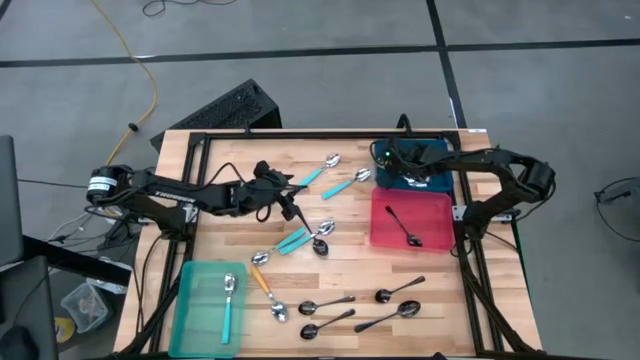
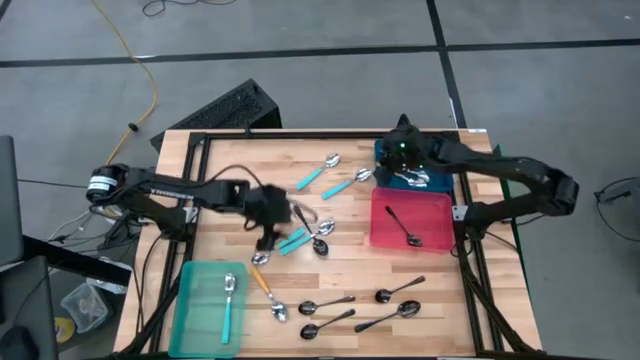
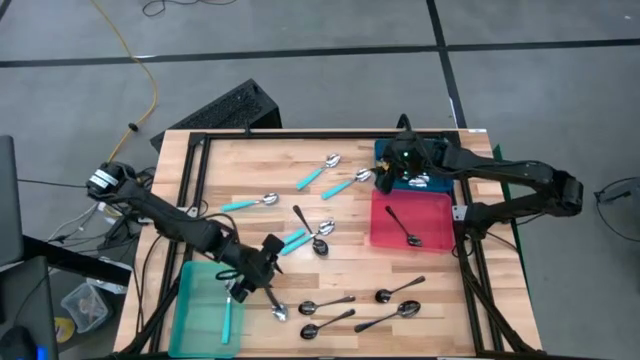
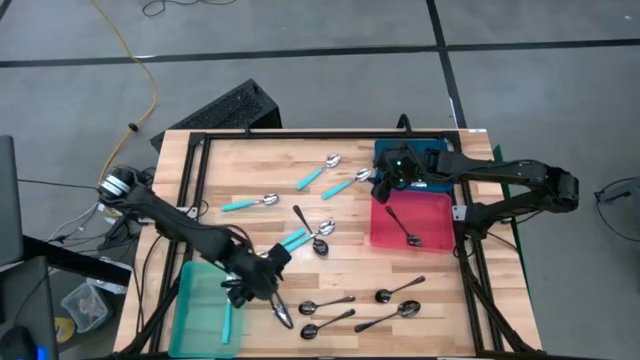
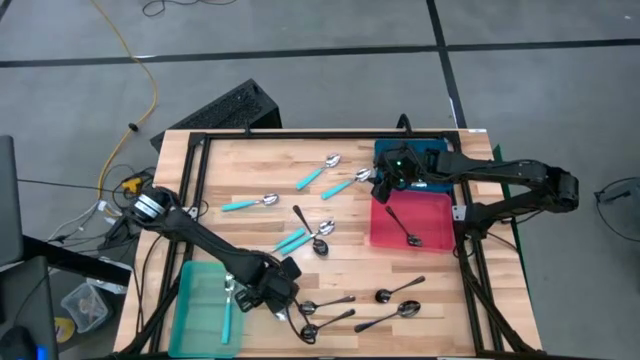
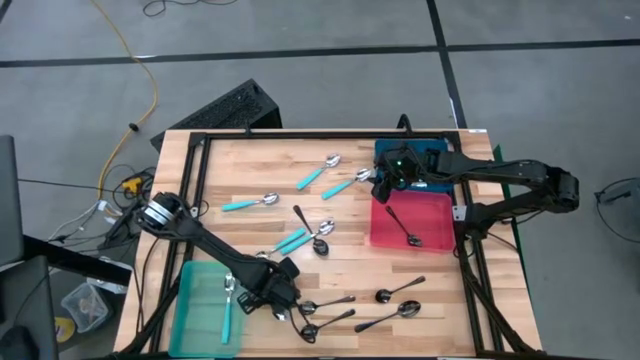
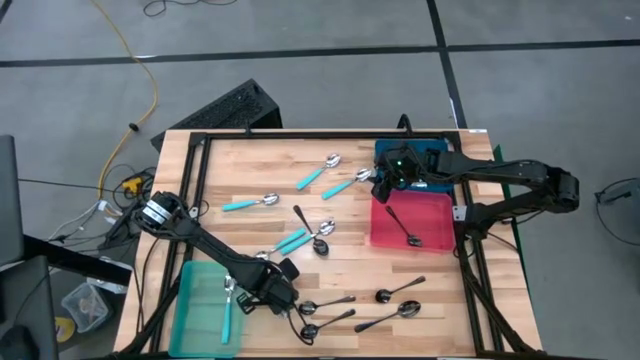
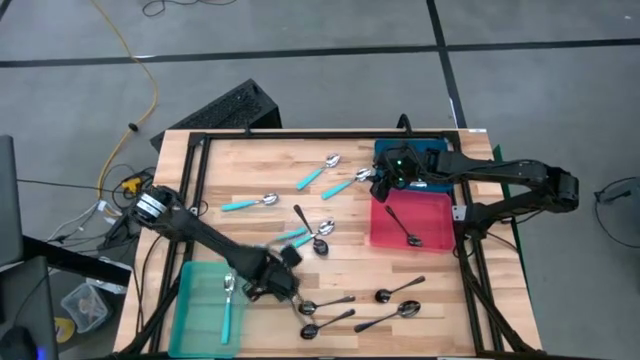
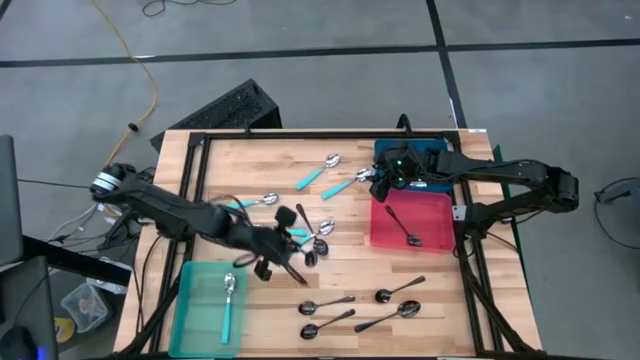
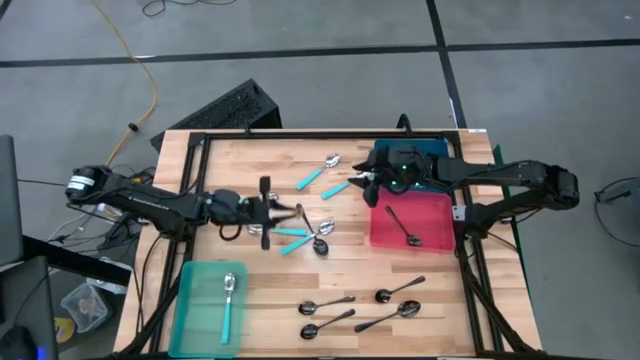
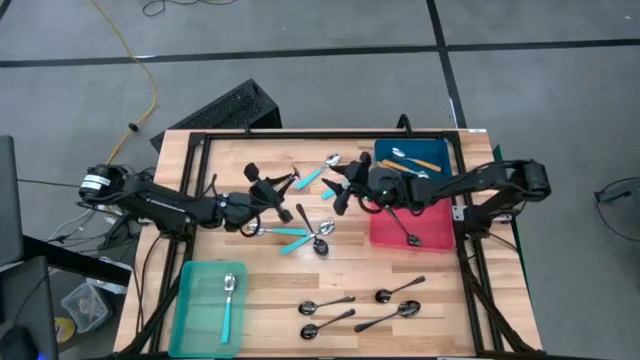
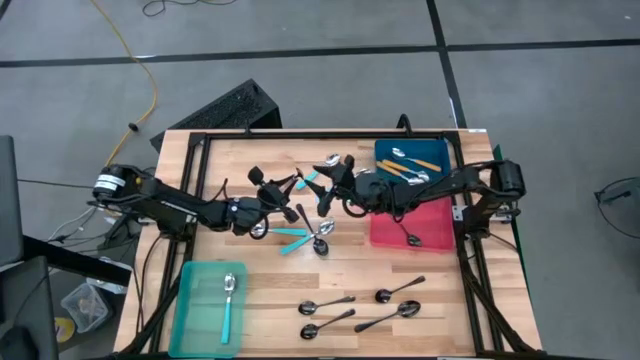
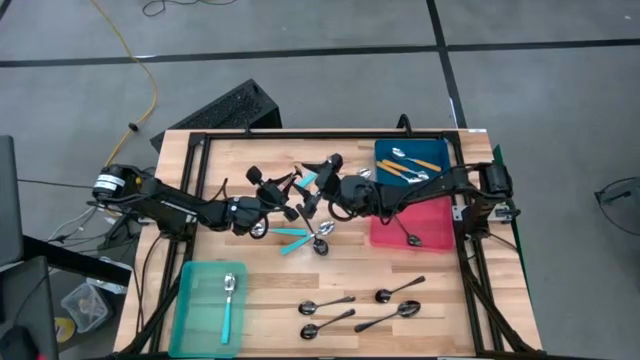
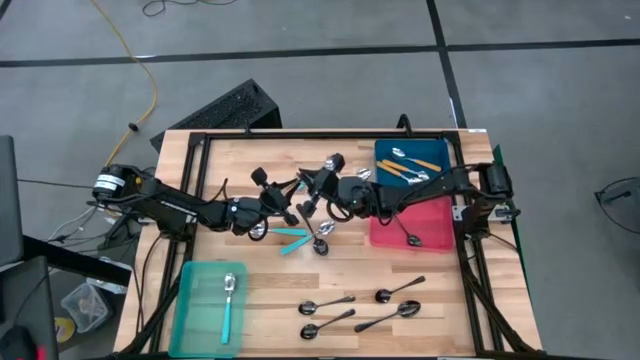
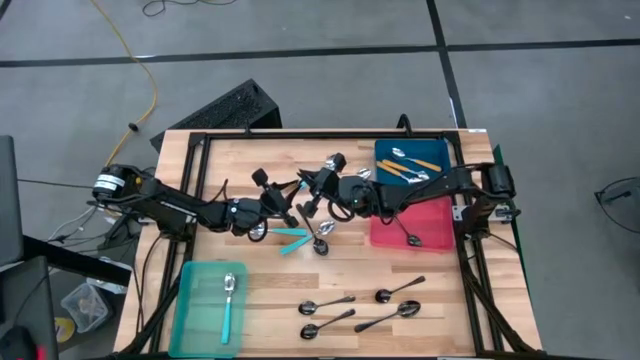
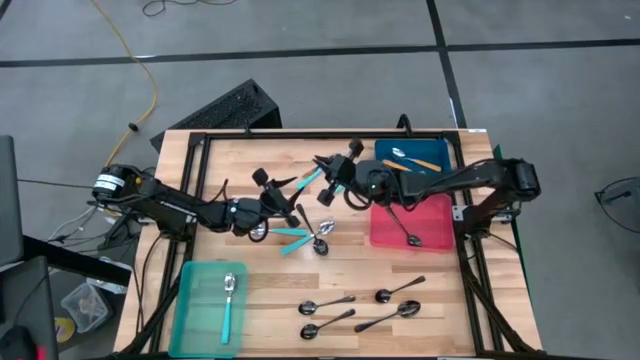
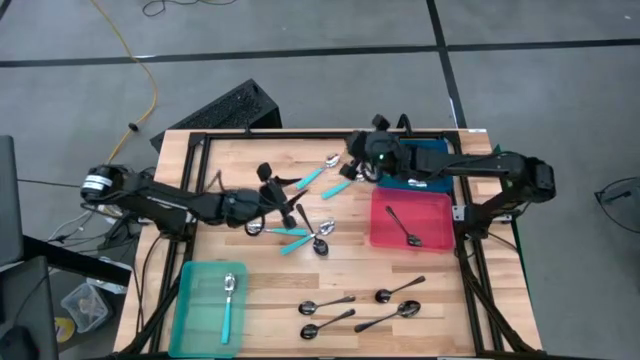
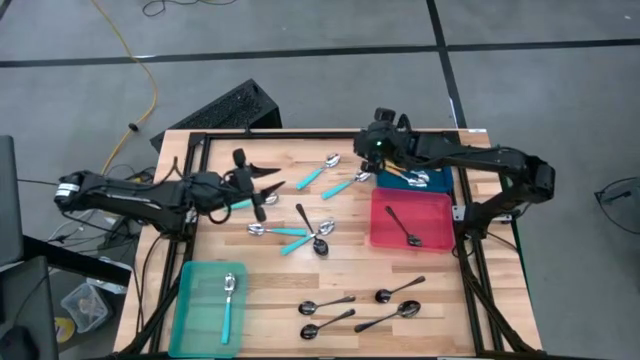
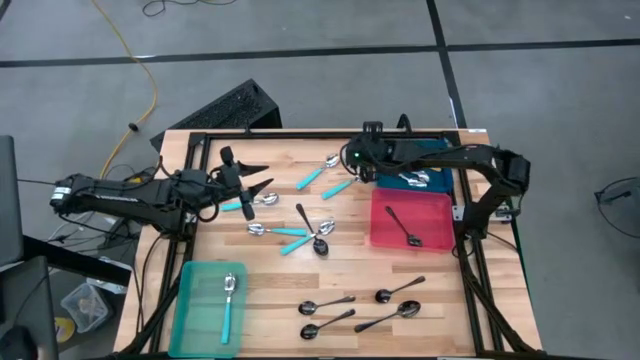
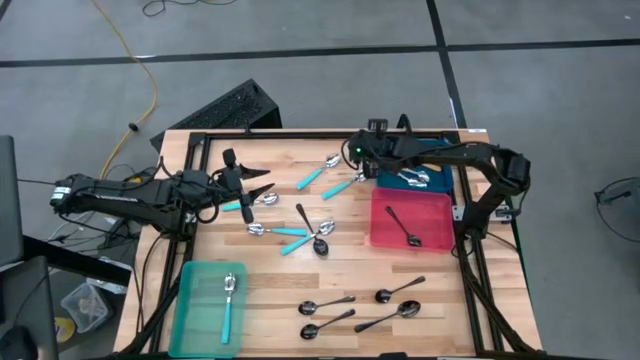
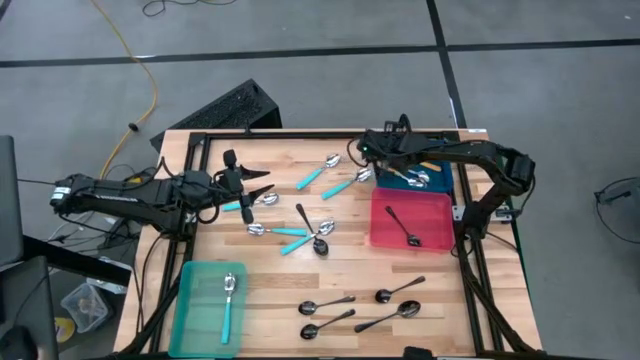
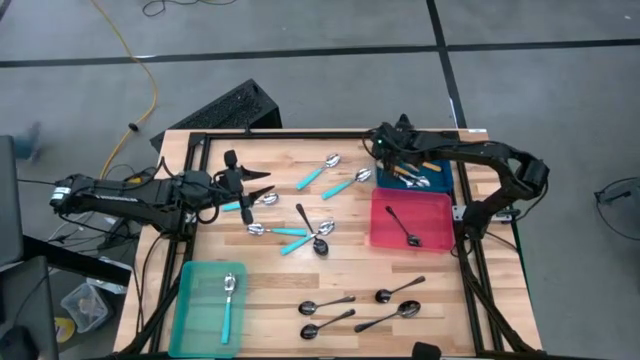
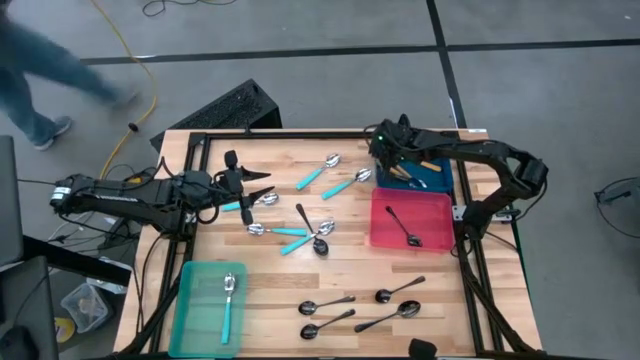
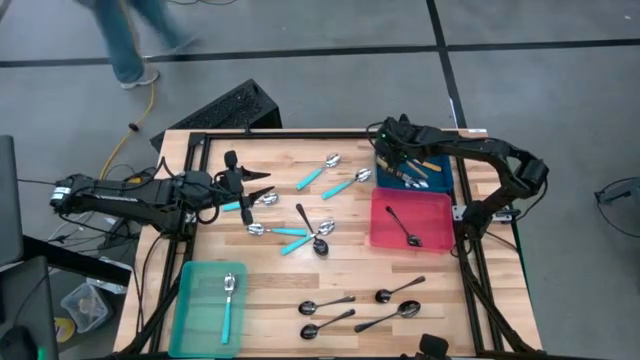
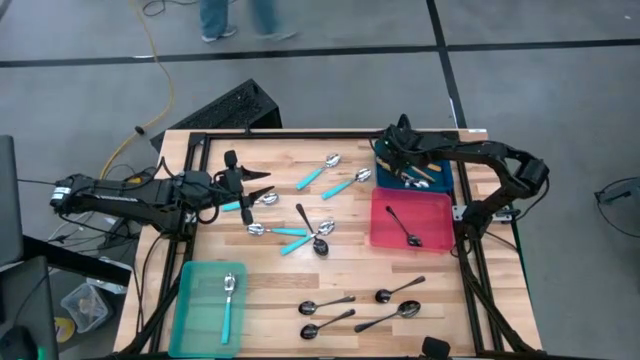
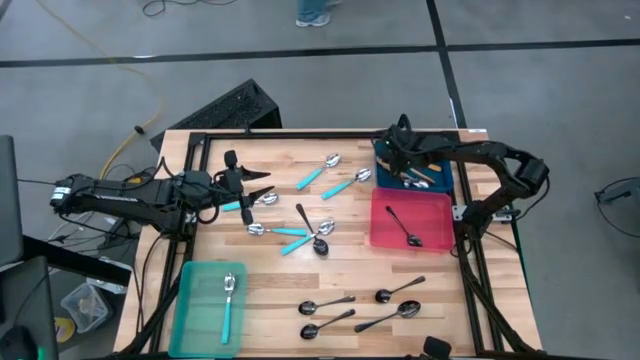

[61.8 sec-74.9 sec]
Task: Sort silverware by color (type)
Put the yellow spoon into the blue bin

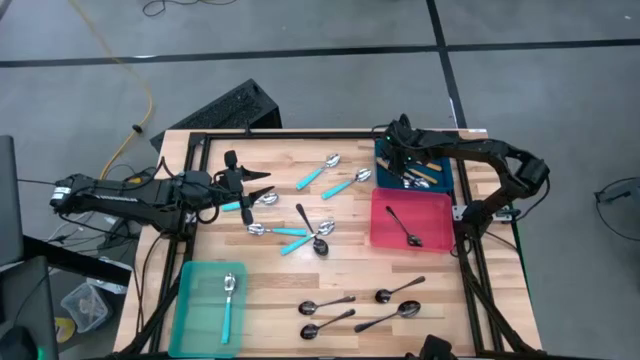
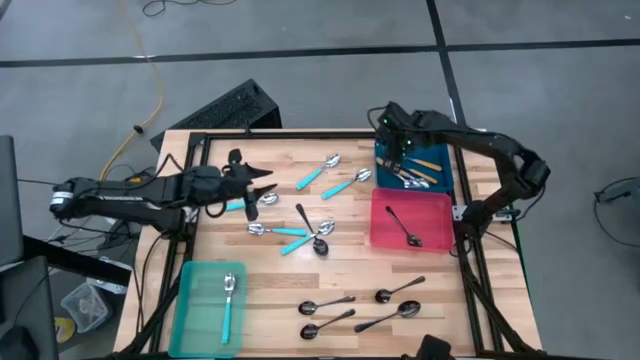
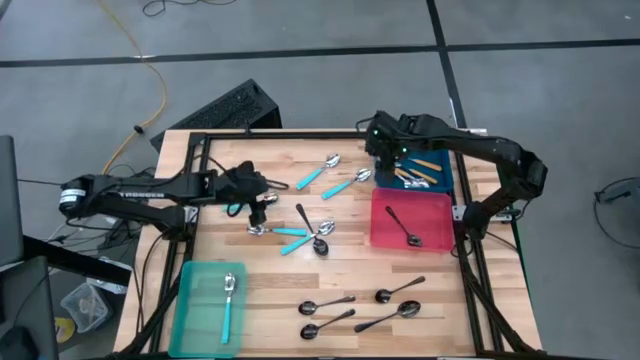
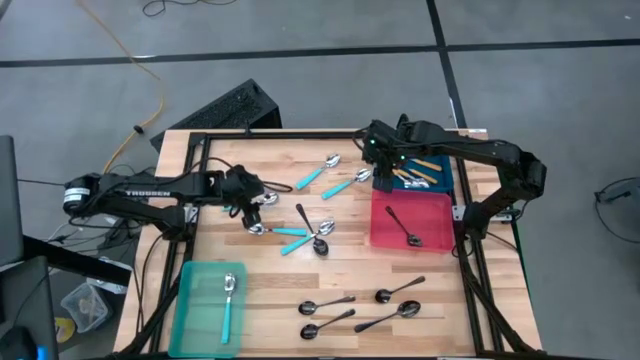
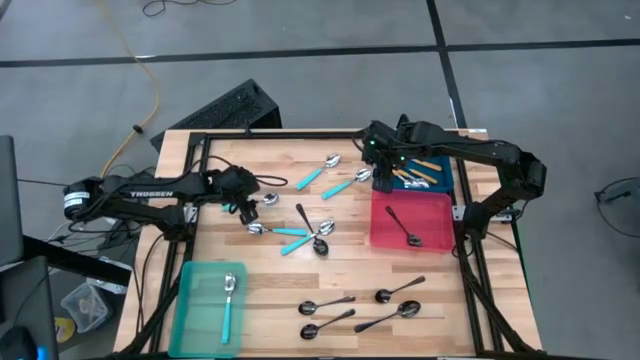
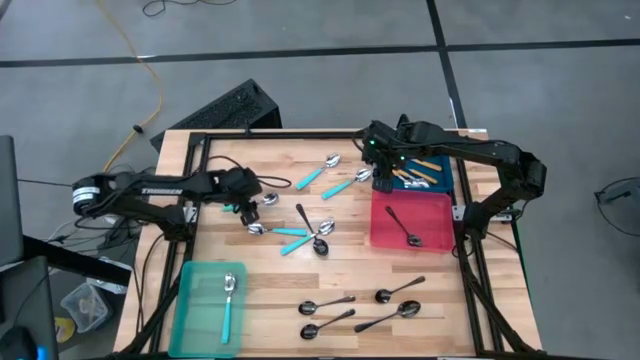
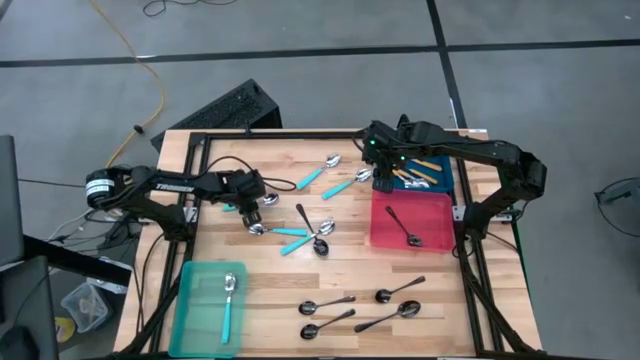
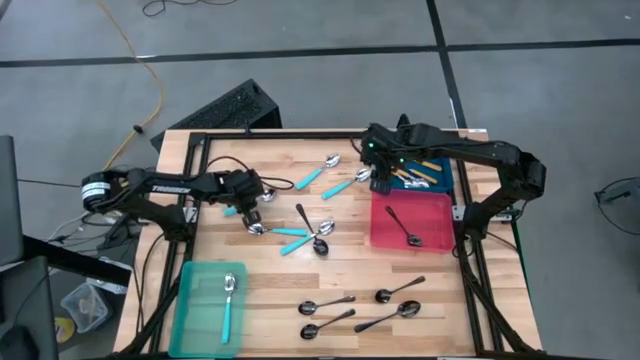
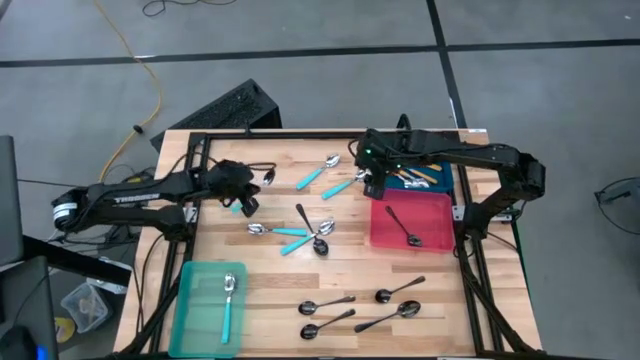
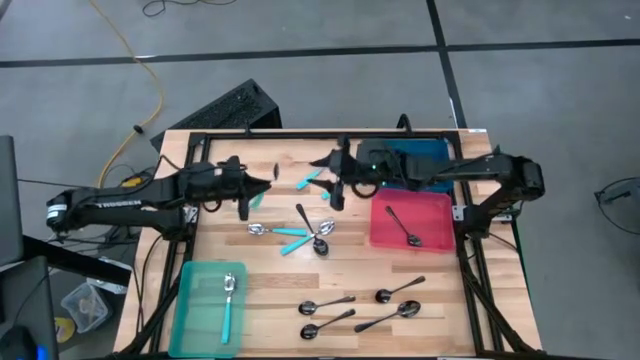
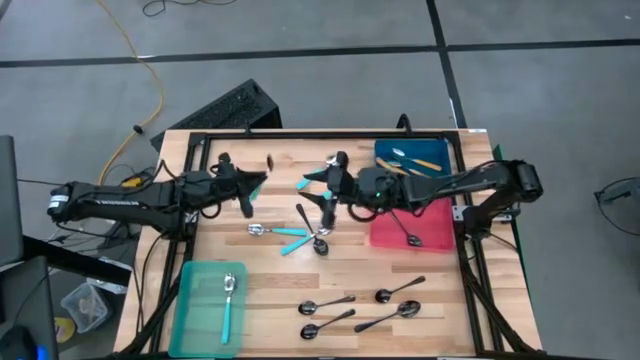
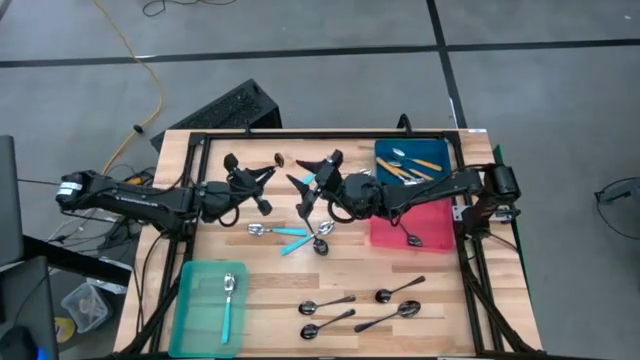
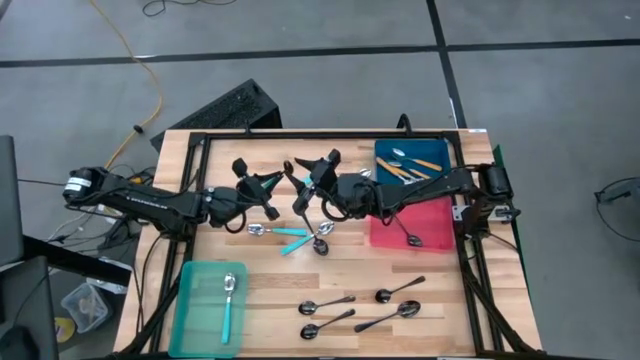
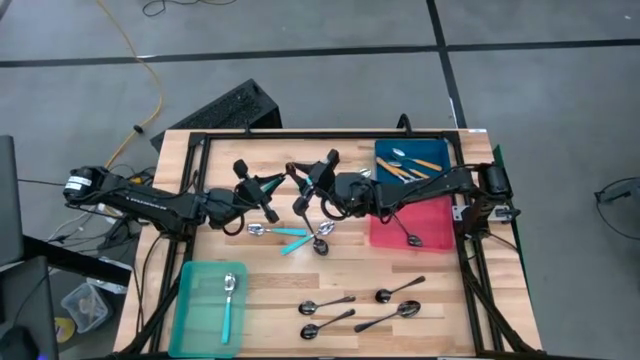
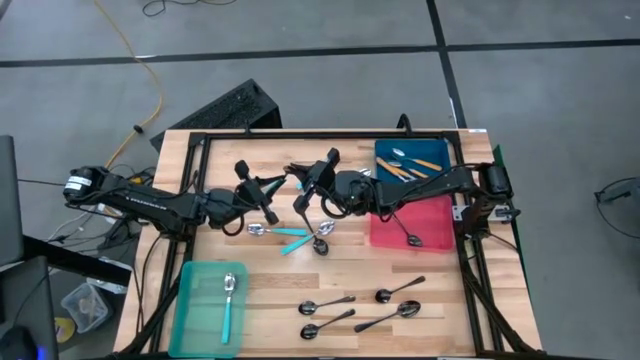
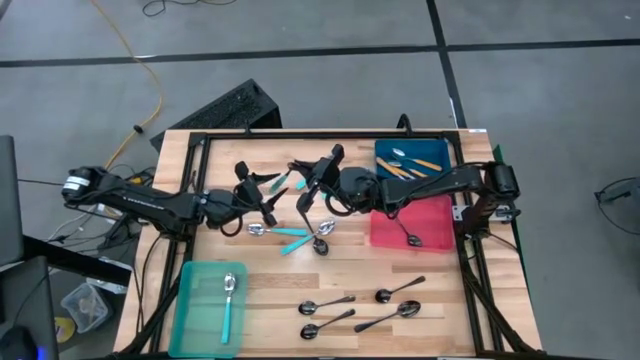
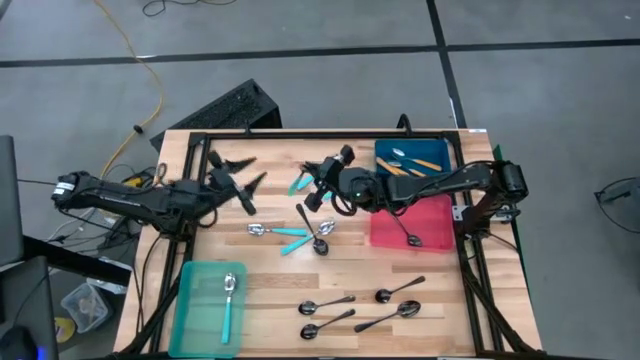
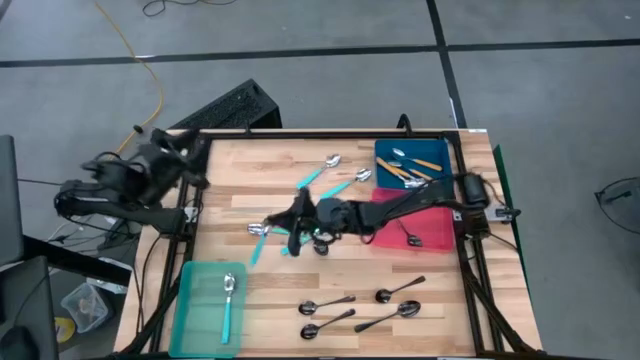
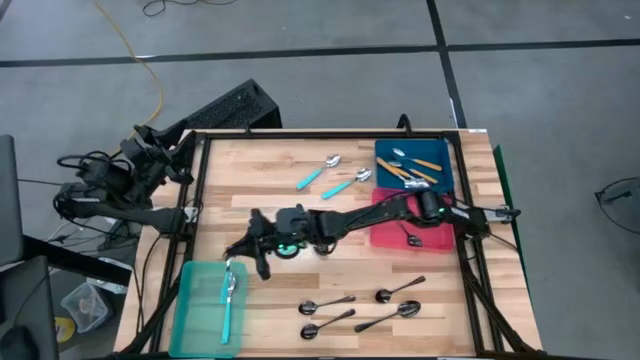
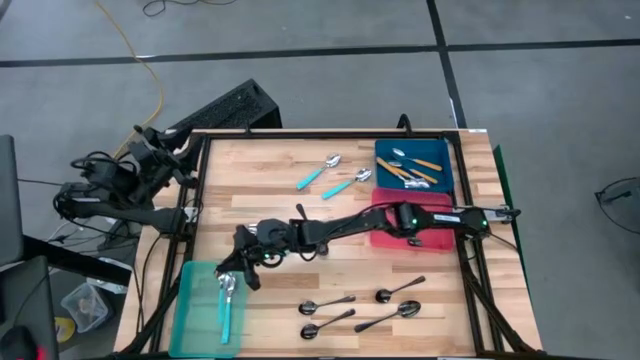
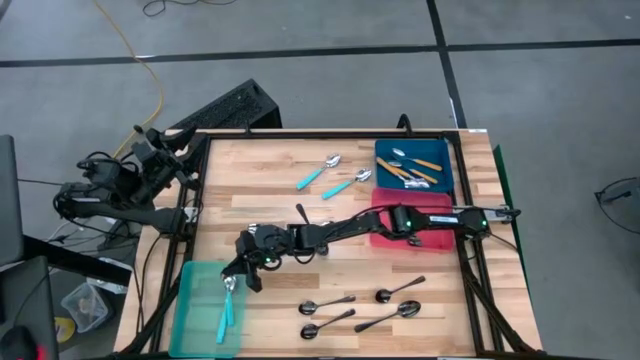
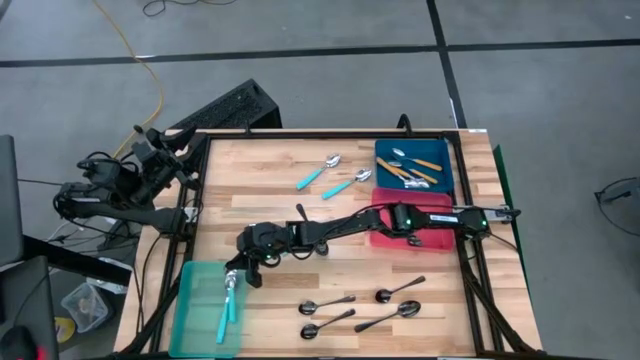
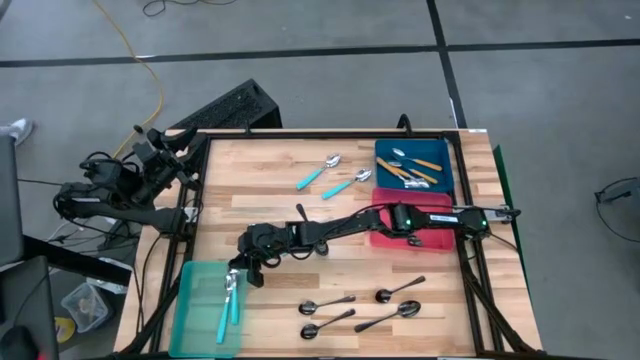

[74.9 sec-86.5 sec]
Put the blue spoon into the skyblue bin
